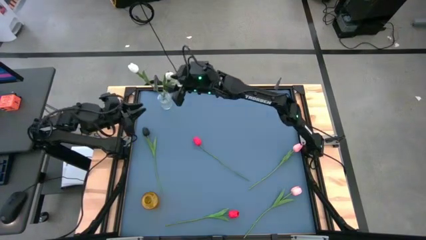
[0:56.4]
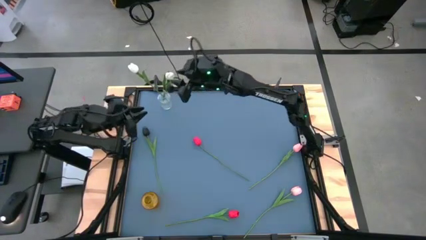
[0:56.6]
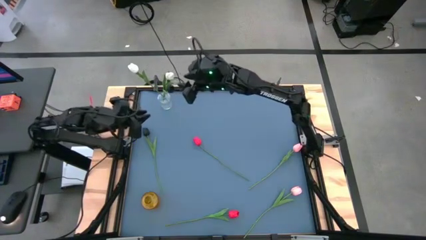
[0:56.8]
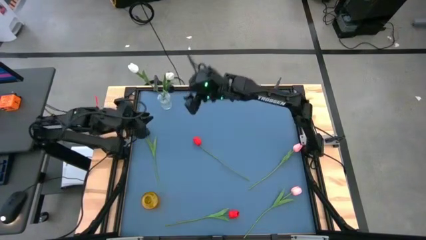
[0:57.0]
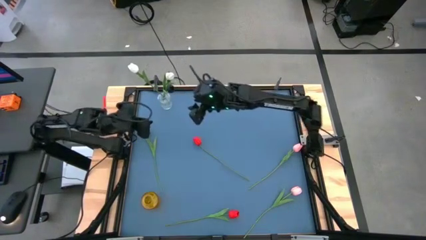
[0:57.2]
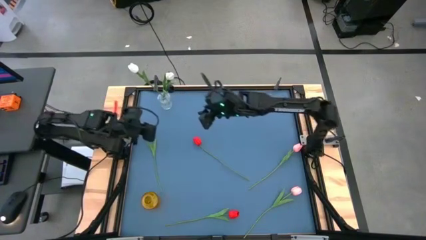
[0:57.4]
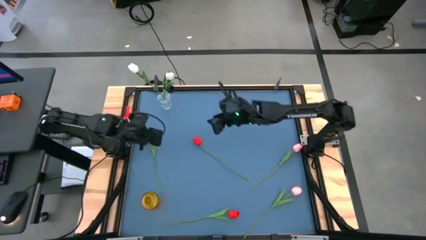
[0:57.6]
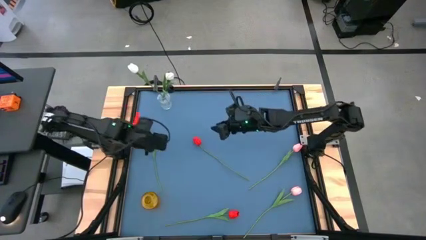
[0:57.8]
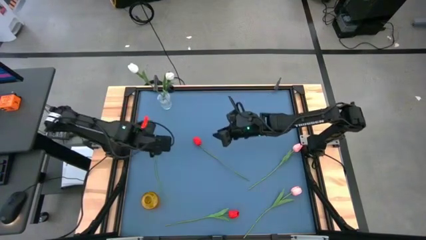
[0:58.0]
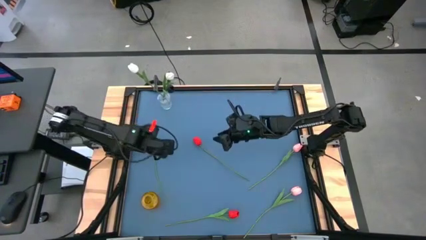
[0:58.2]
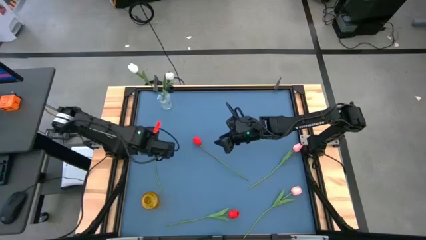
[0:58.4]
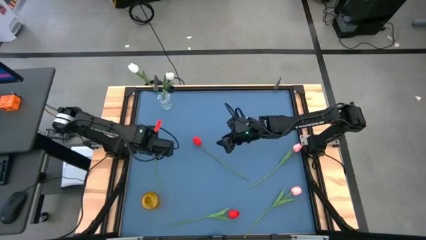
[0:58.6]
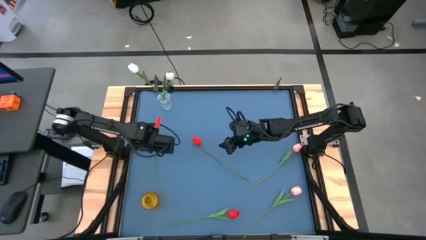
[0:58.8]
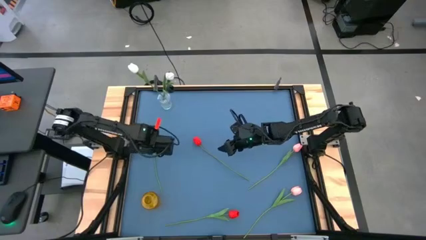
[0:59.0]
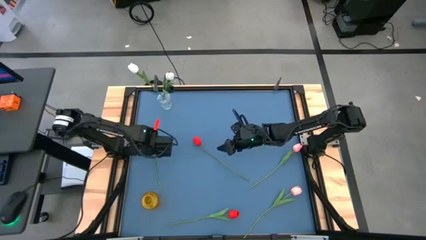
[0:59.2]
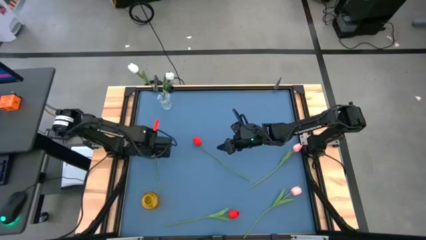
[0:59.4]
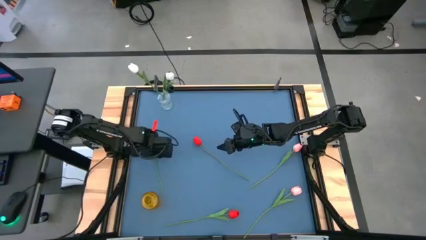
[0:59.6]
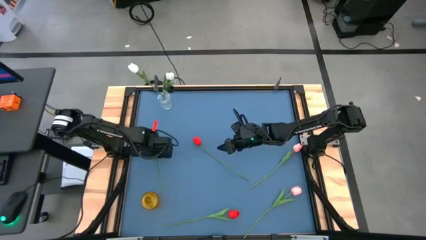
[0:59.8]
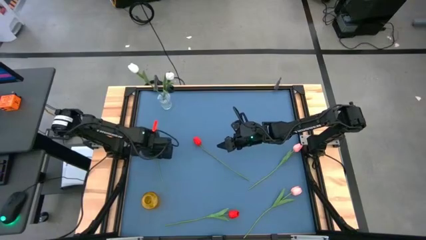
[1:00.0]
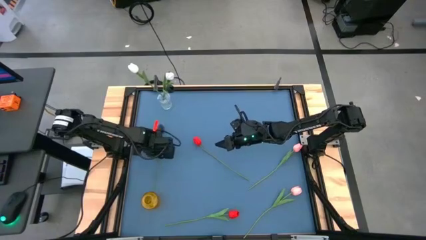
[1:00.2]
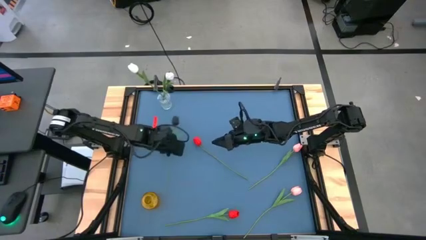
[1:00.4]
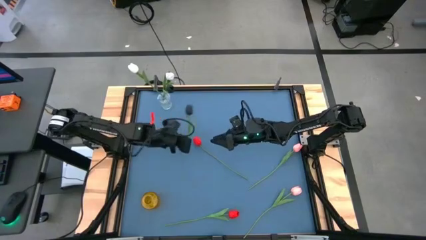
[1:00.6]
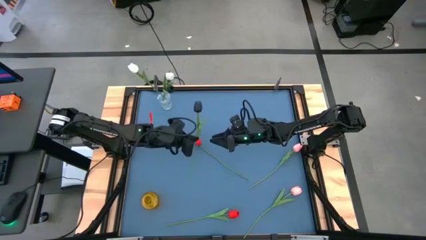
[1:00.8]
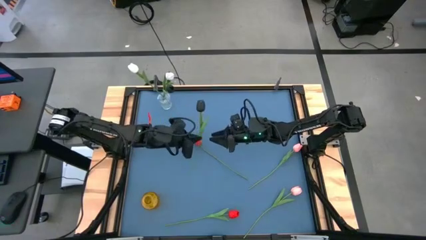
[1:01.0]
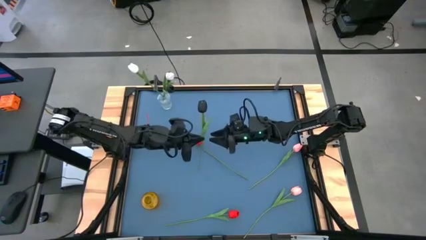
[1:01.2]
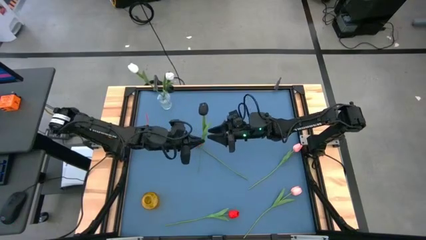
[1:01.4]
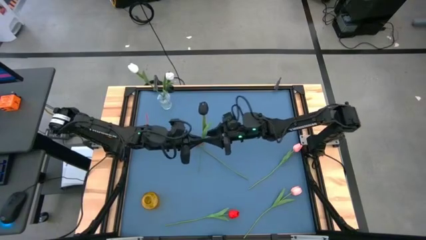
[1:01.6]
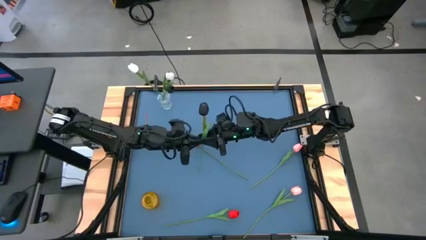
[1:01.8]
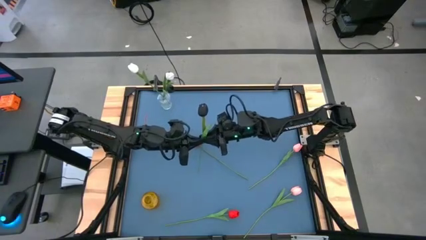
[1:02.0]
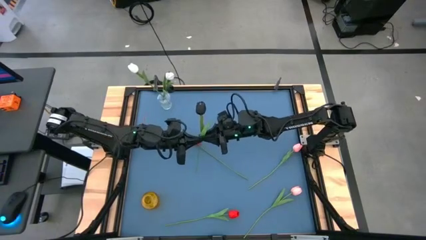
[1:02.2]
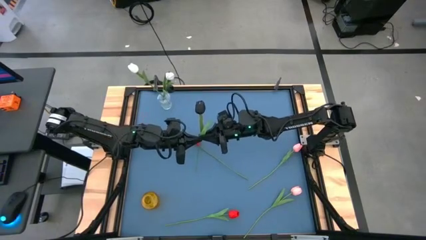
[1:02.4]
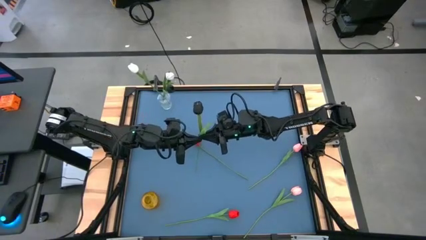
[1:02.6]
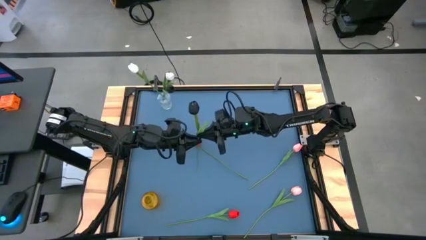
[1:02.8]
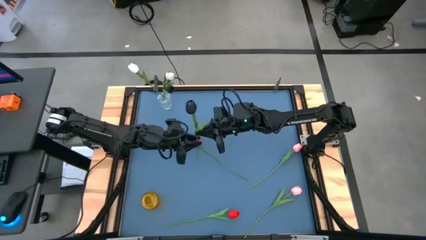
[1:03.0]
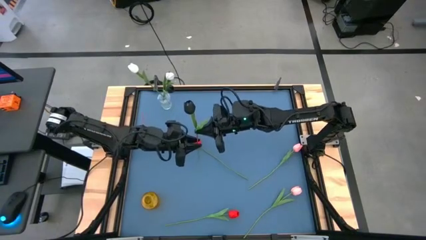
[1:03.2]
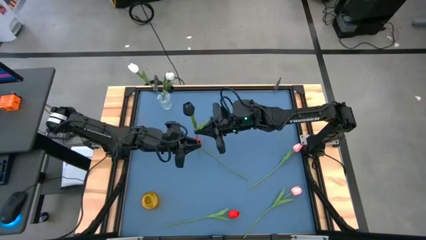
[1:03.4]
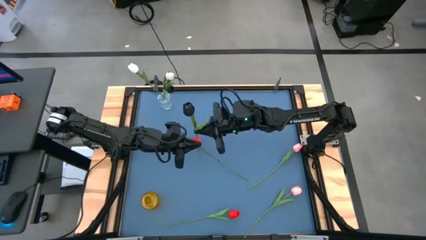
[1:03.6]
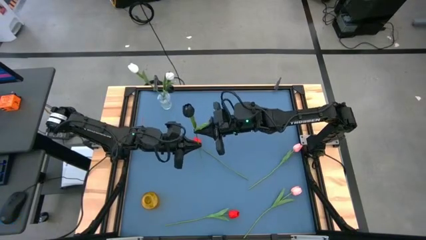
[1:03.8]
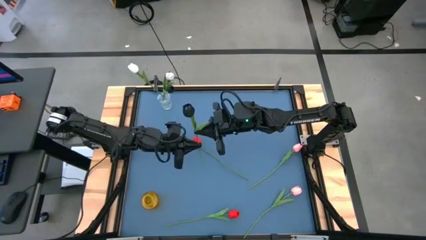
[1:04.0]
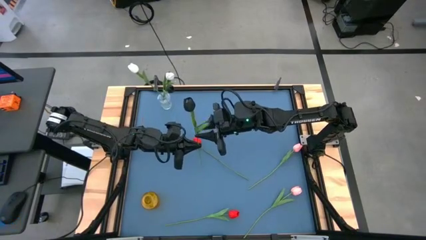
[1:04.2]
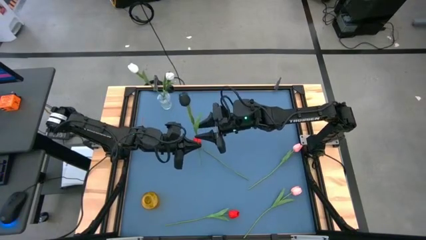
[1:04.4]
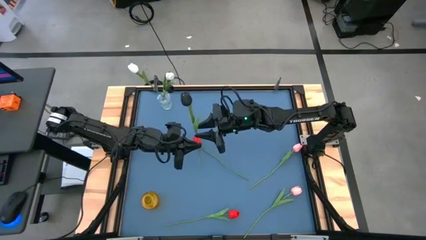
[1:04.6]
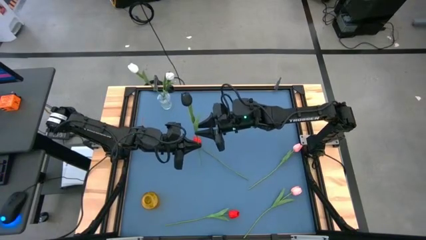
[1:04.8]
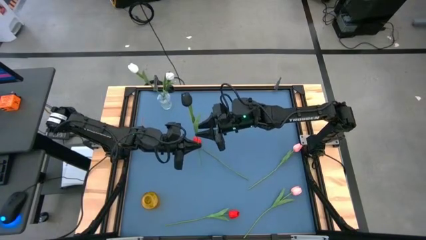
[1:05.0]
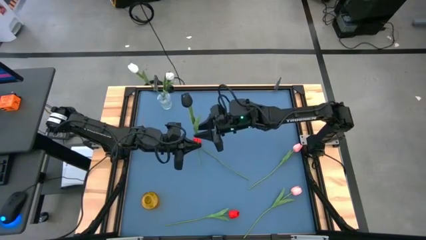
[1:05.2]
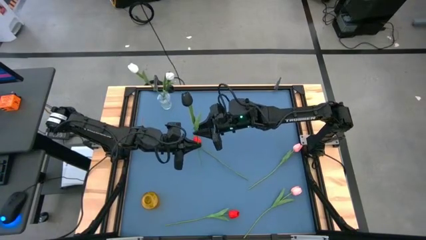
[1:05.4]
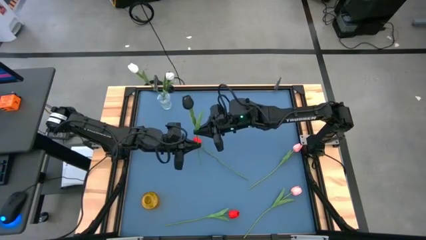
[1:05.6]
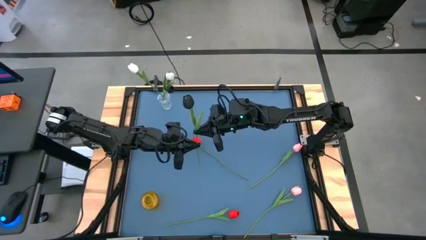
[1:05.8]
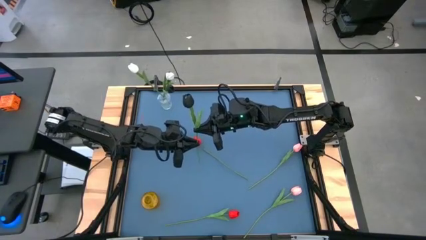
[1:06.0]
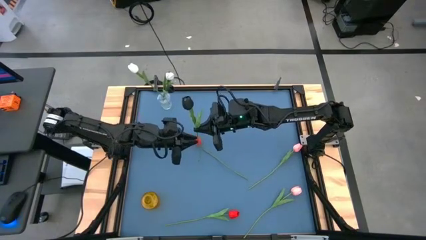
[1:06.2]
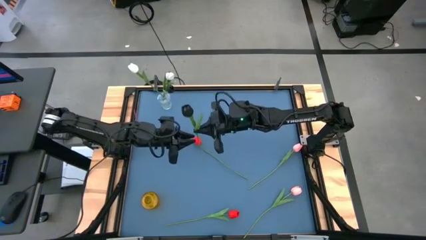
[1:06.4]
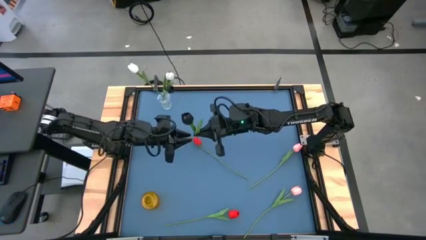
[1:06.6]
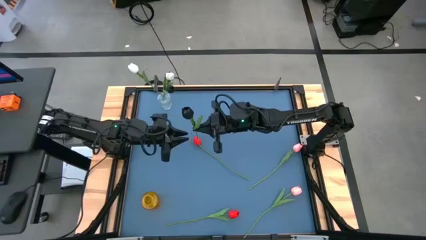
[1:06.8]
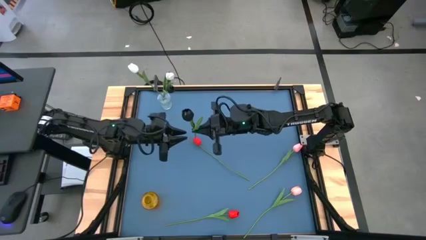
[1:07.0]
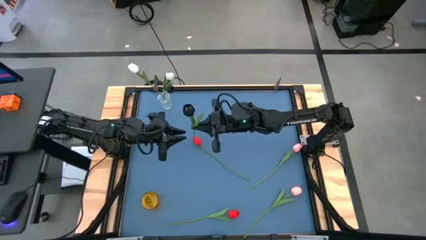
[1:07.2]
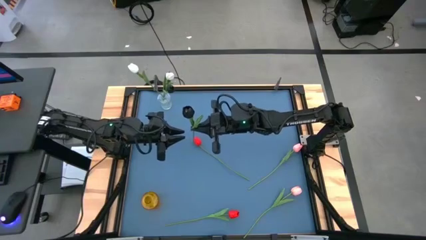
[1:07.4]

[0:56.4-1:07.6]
Task: Sort flowers into vase by color
Put the black tulip into the transparent flower vase

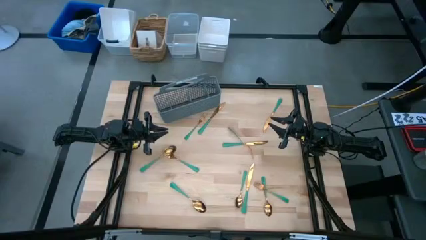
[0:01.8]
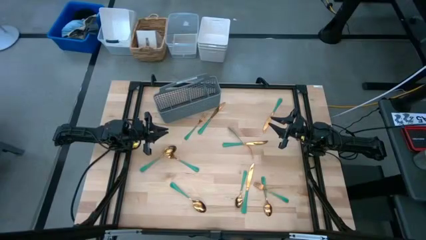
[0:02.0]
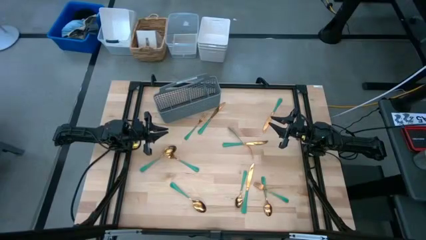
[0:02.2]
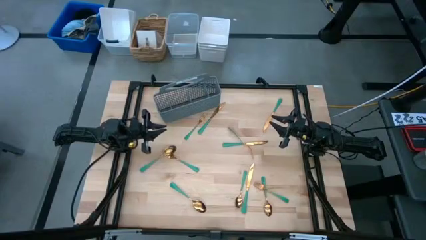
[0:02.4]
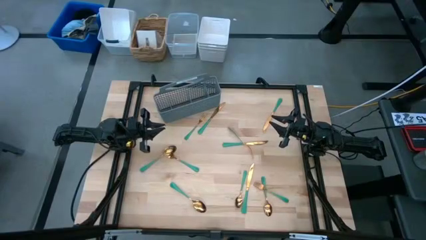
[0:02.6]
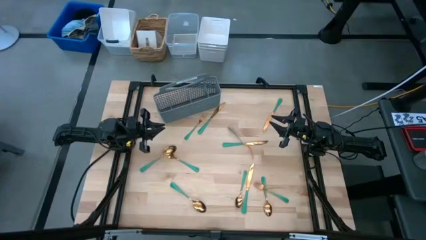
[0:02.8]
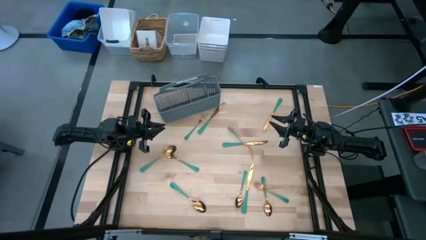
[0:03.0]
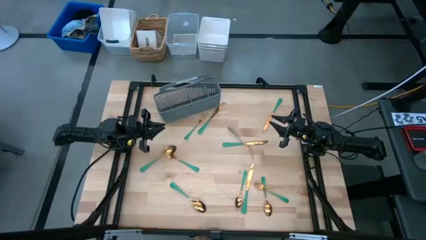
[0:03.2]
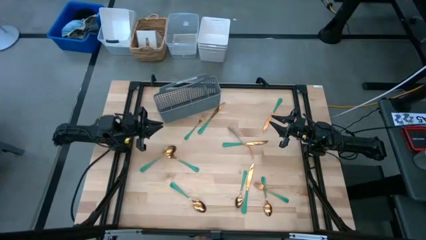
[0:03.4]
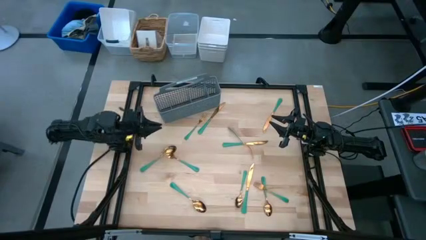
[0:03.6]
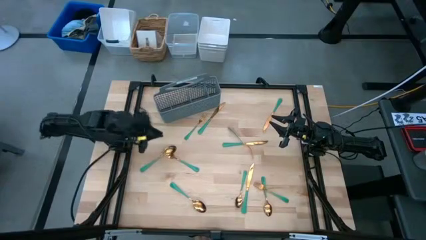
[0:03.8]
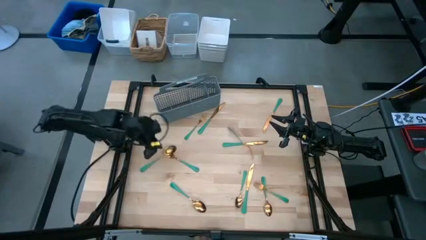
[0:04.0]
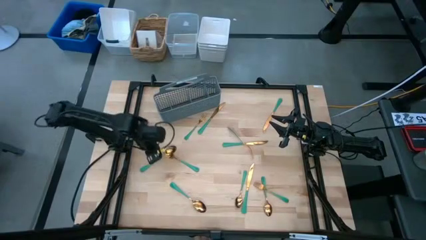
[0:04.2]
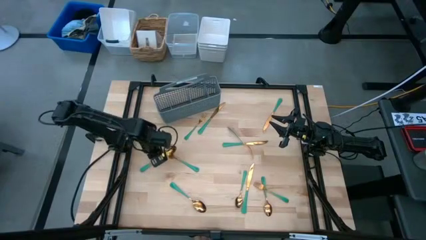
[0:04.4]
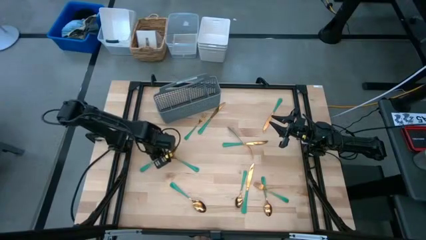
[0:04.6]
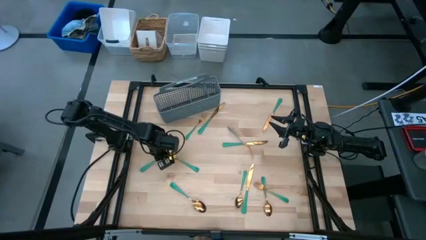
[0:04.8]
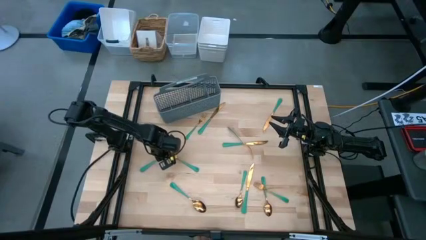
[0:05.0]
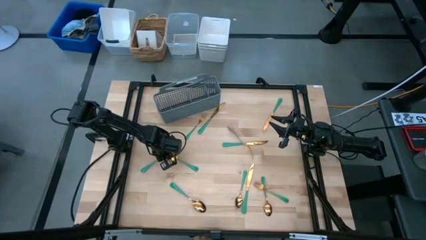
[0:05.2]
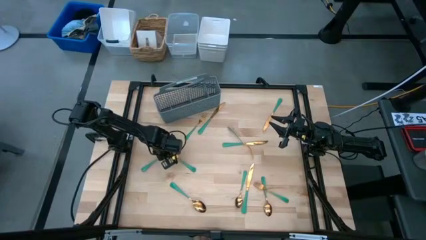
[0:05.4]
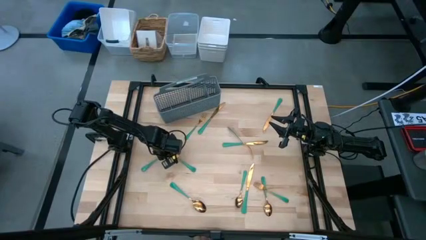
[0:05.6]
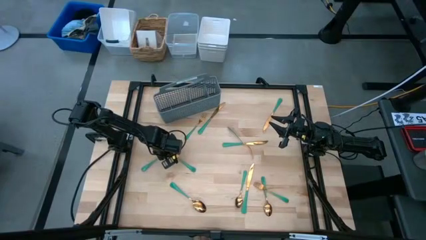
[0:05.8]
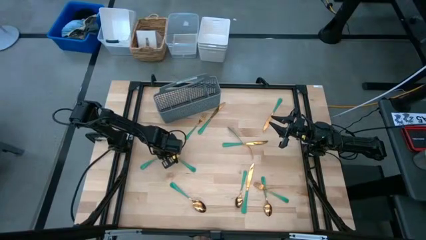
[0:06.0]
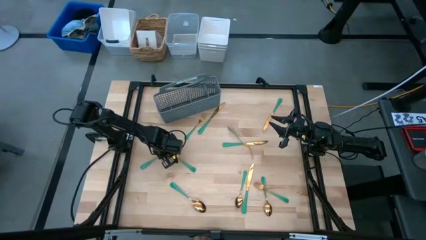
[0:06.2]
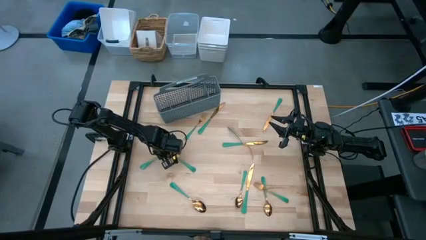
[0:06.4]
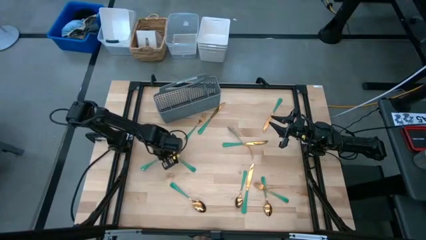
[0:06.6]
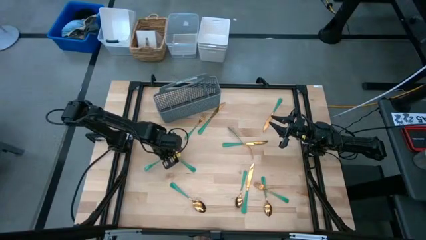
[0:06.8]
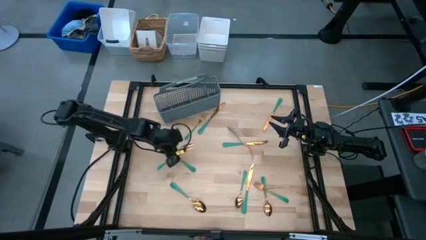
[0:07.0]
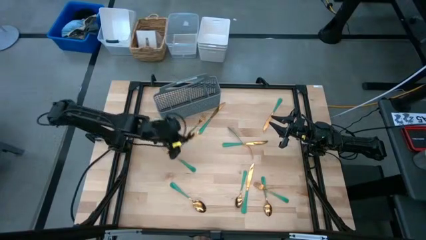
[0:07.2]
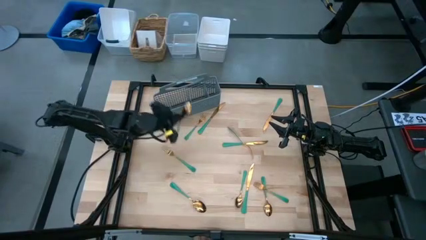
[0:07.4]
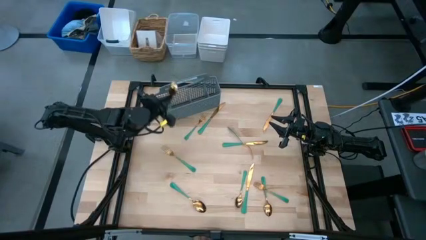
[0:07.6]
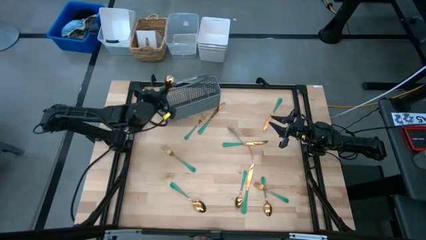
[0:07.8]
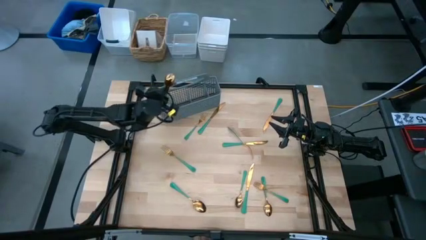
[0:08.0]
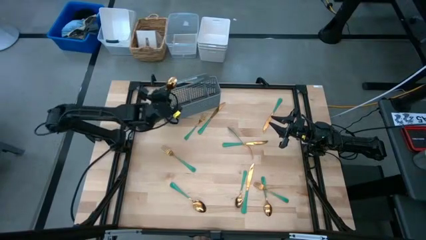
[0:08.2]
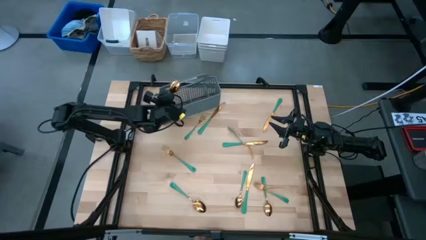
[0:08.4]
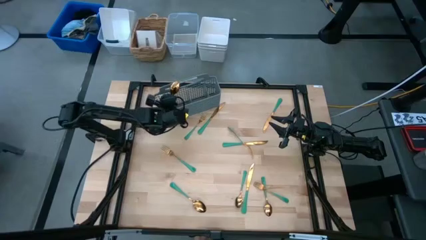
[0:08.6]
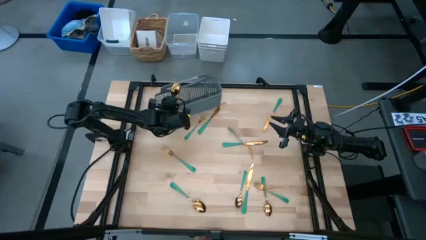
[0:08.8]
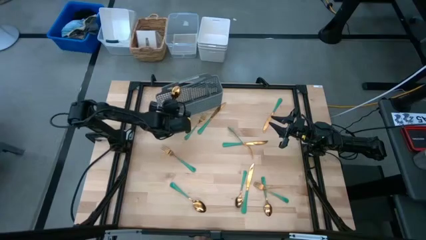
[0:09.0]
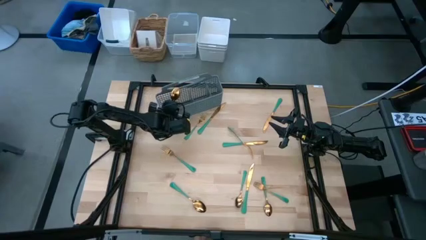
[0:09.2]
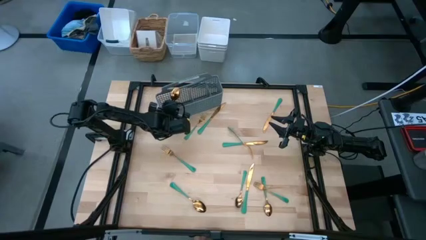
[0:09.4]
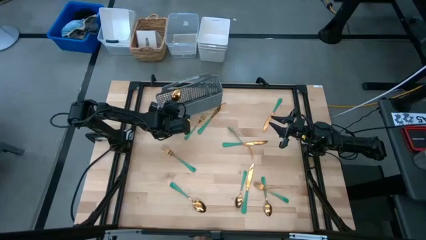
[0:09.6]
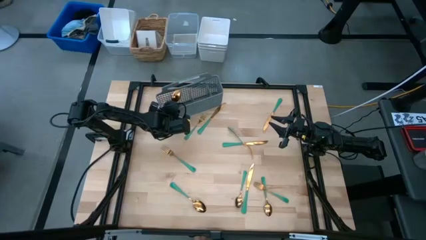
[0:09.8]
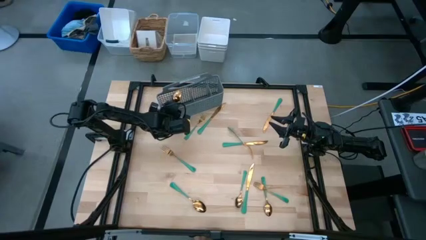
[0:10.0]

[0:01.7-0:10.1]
Task: Sort silverware
Put the spoon into the left section of the silverware holder
